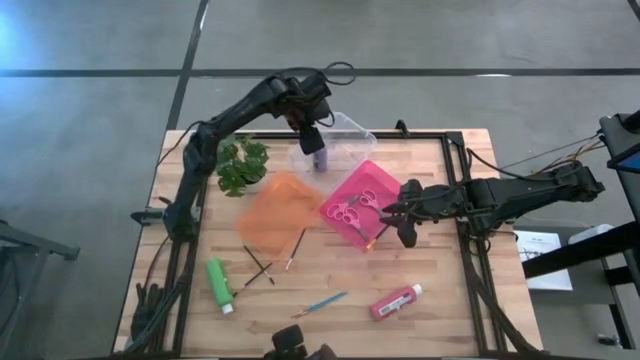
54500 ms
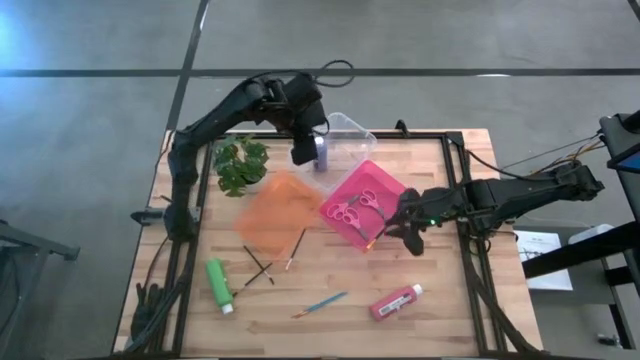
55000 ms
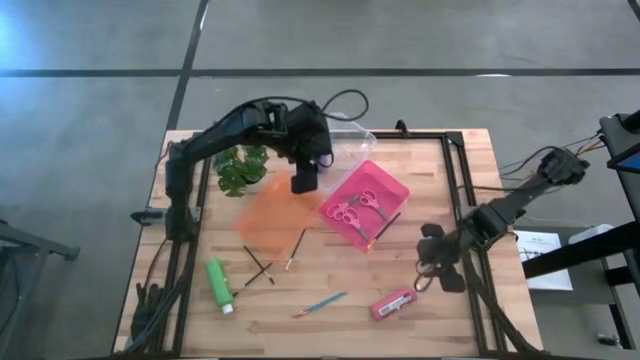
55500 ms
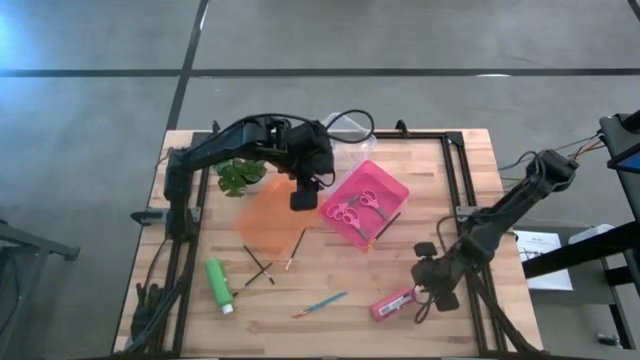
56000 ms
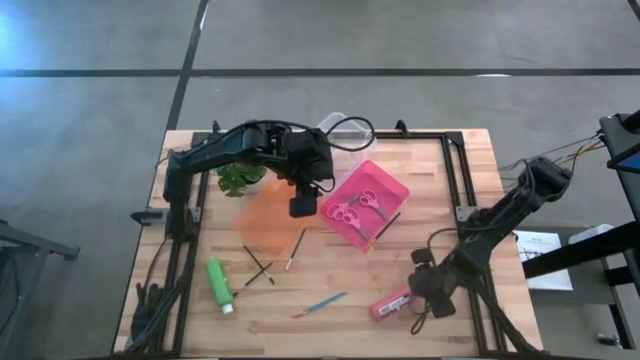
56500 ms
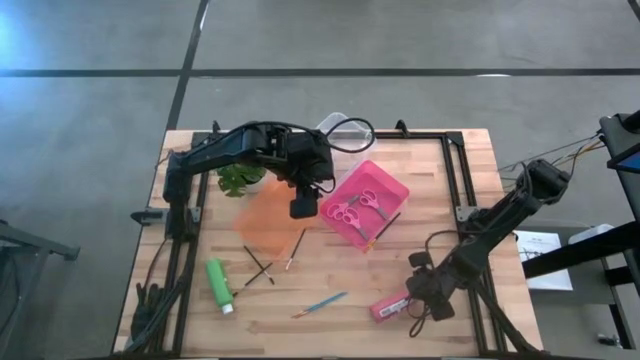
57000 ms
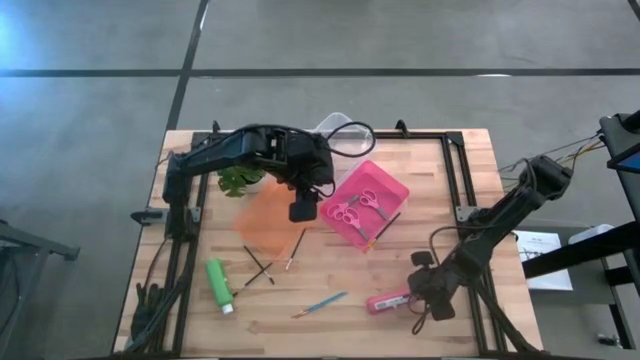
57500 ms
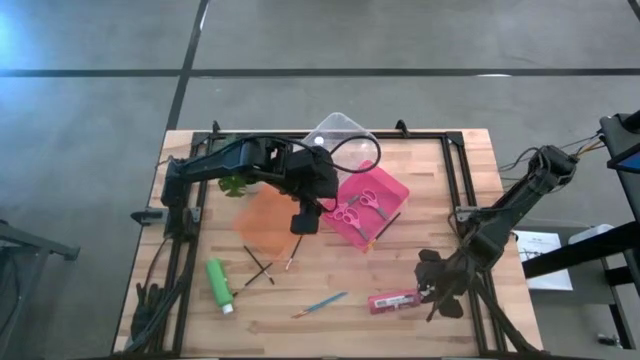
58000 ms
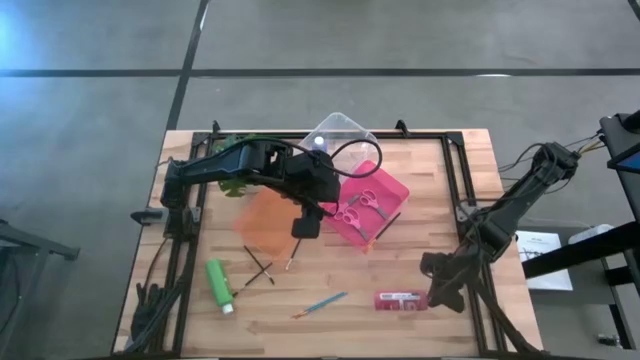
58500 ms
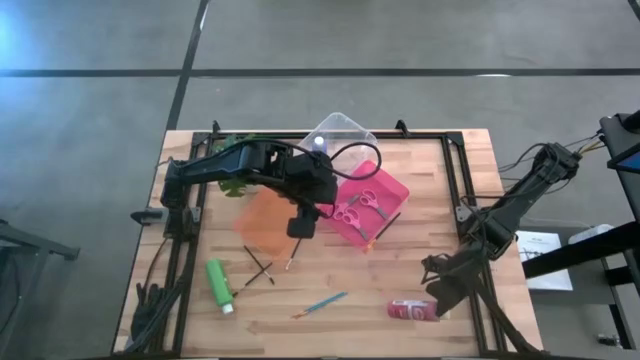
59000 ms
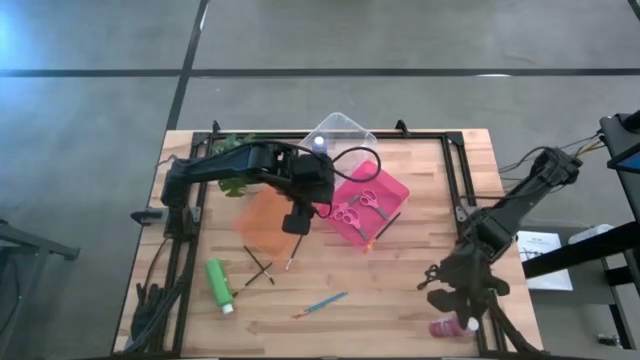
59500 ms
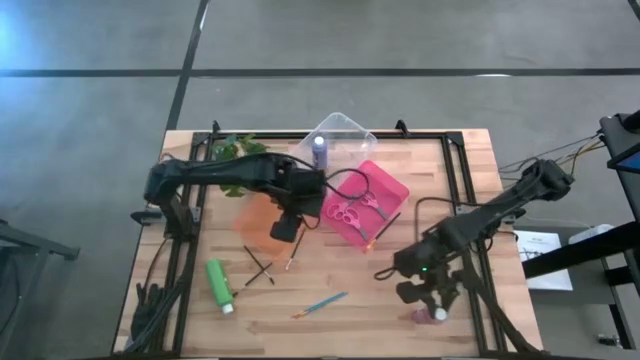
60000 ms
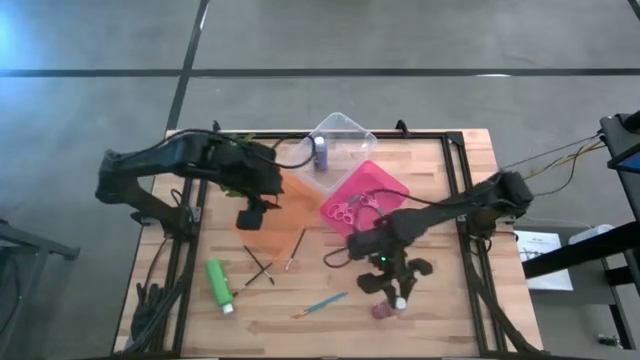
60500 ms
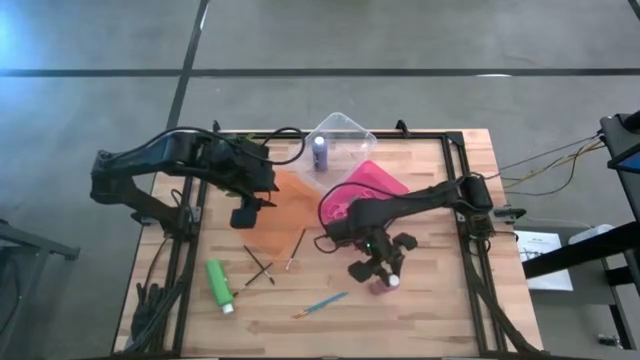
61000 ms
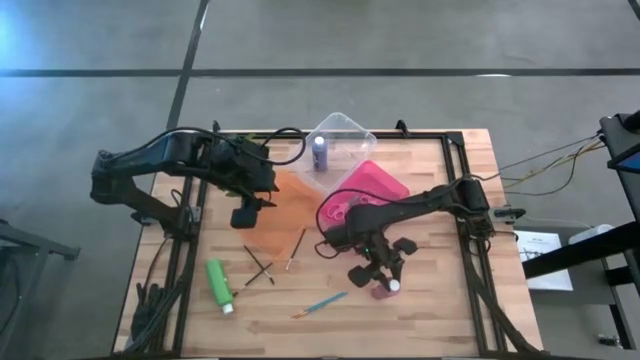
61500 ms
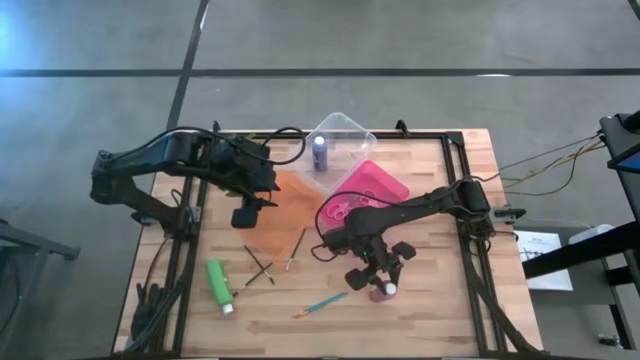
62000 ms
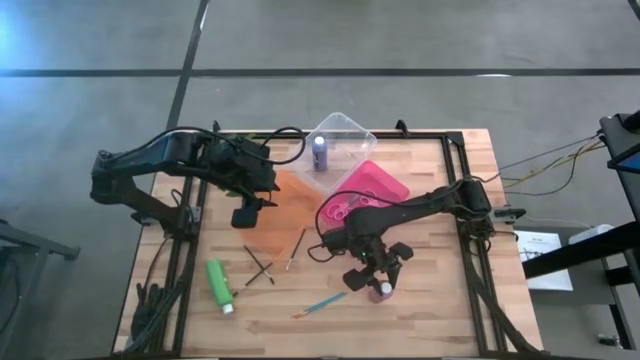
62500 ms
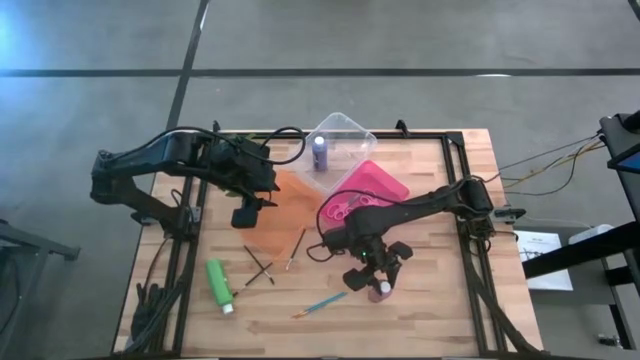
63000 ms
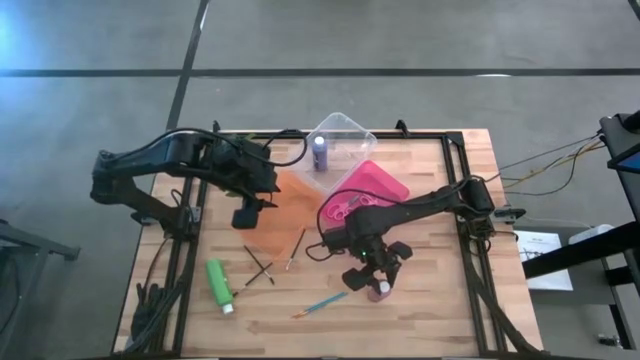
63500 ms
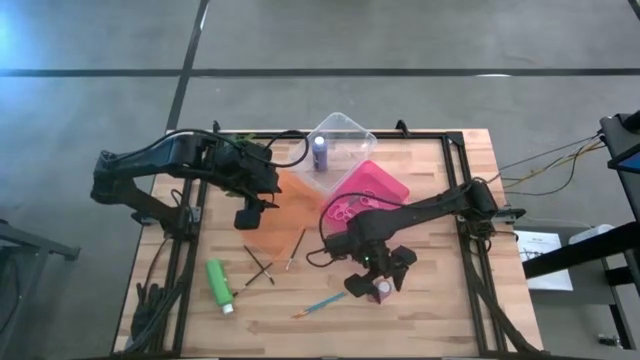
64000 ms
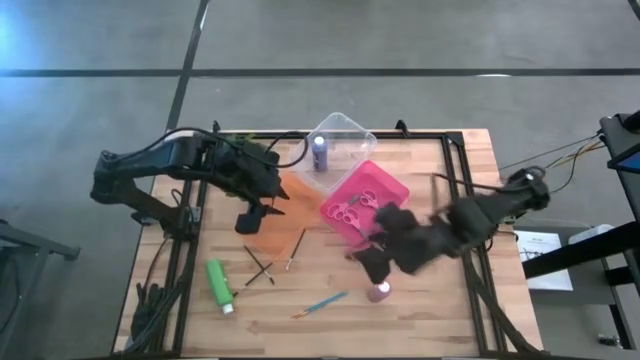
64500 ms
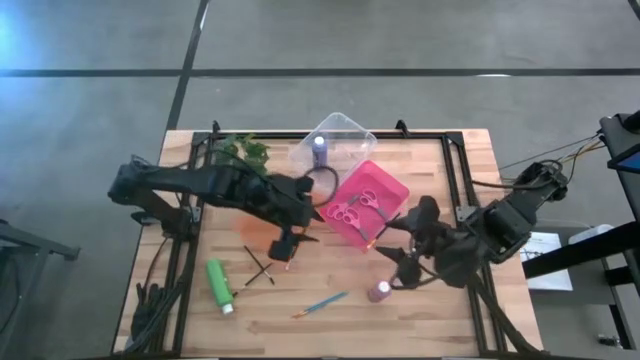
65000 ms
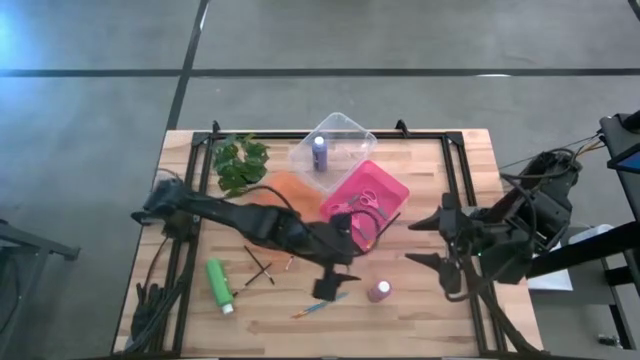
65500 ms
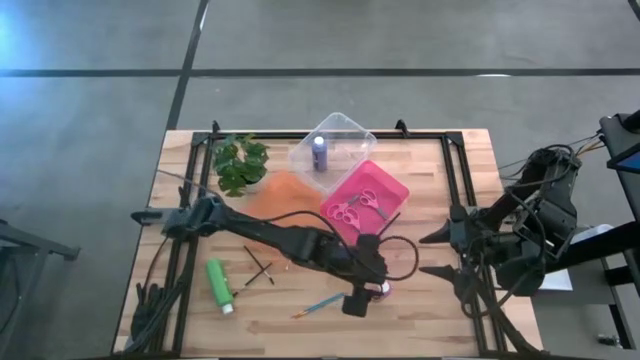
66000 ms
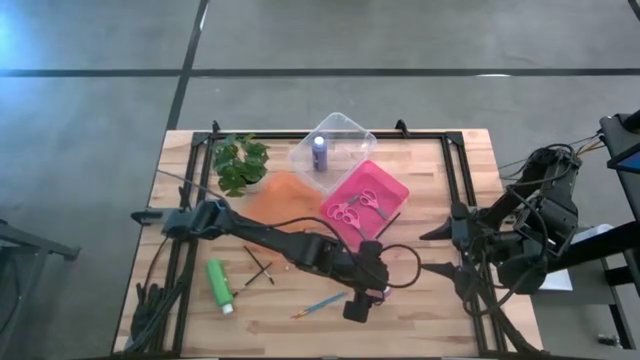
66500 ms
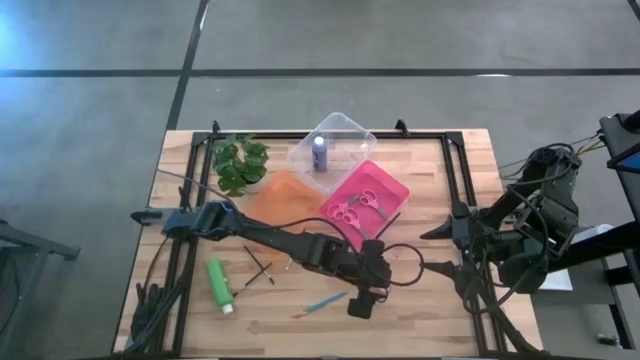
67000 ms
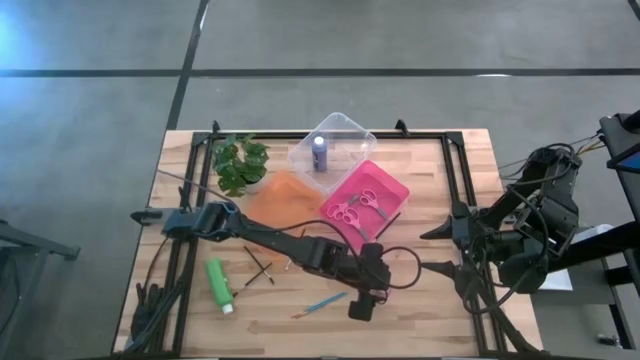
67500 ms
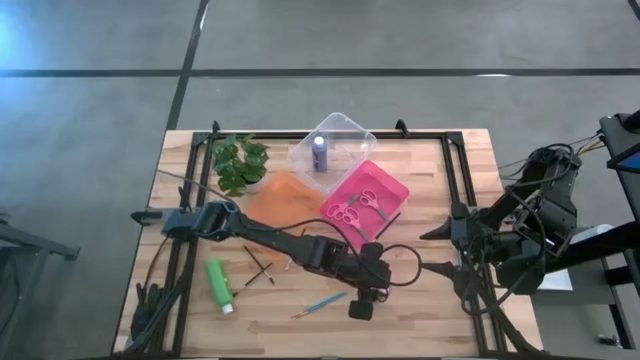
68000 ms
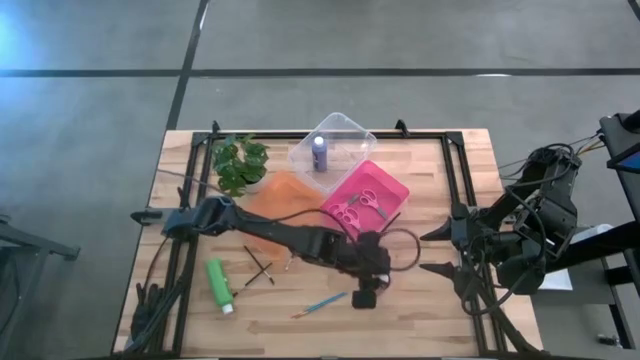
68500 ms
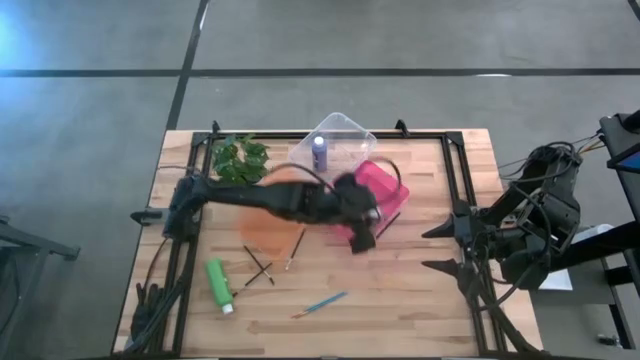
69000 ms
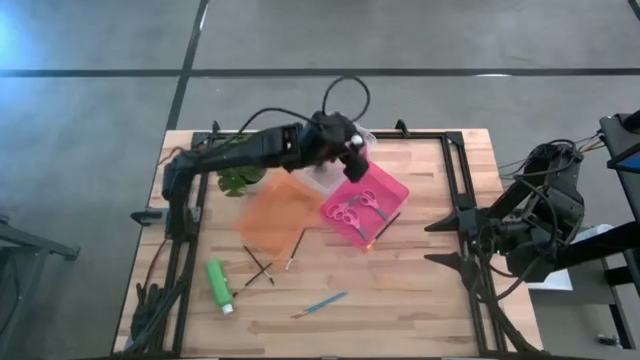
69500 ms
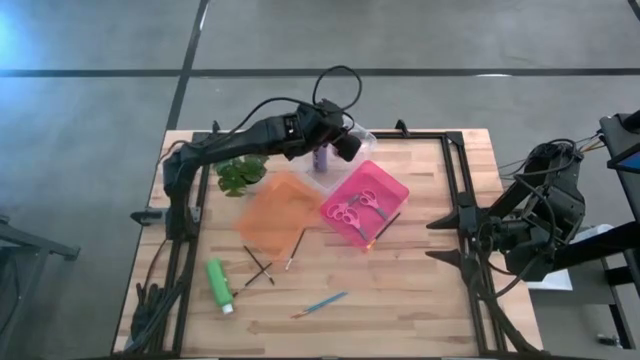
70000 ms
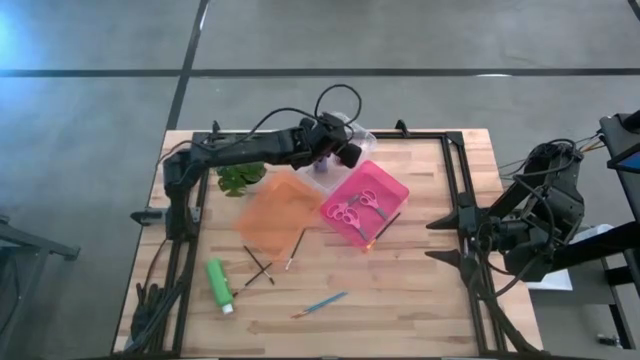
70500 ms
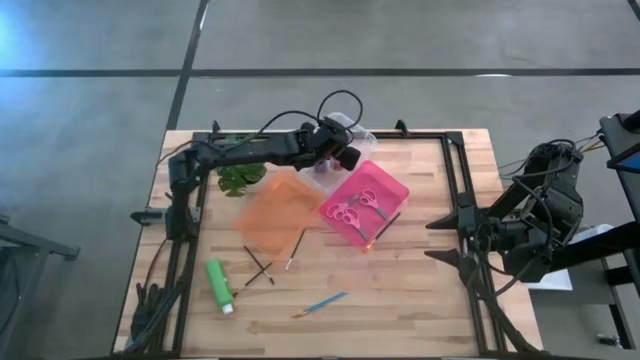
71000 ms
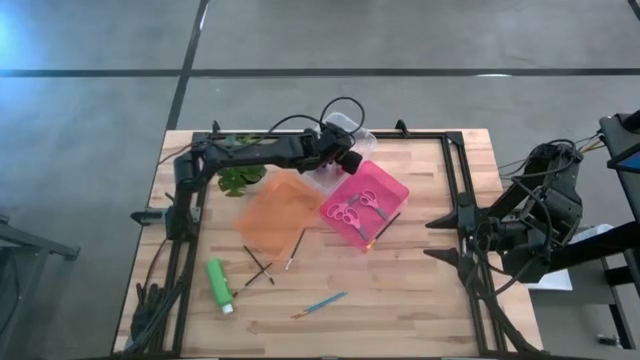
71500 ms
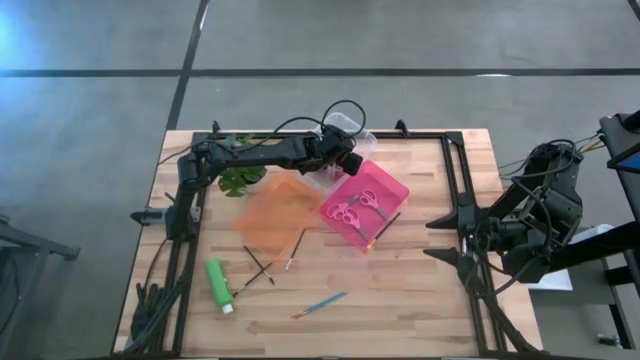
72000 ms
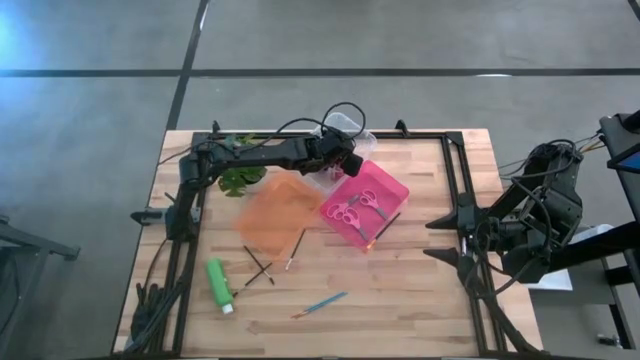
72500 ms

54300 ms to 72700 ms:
Task: Pick & Place Paint Supplies
Put the pink paint bottle into the transparent bin

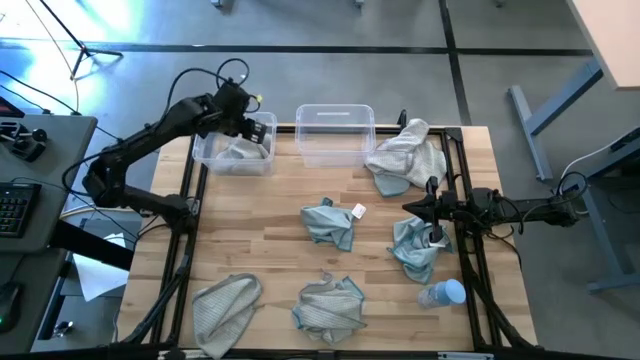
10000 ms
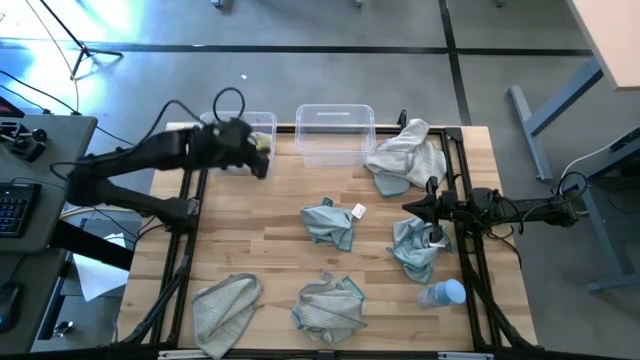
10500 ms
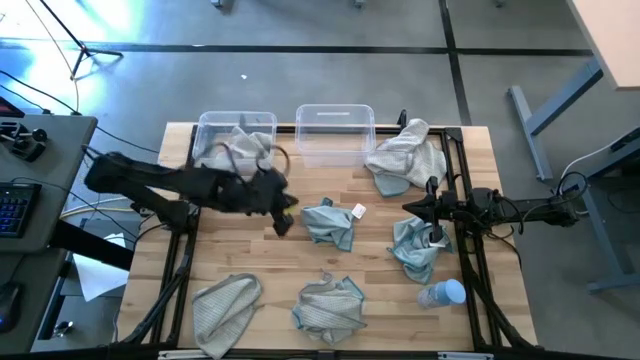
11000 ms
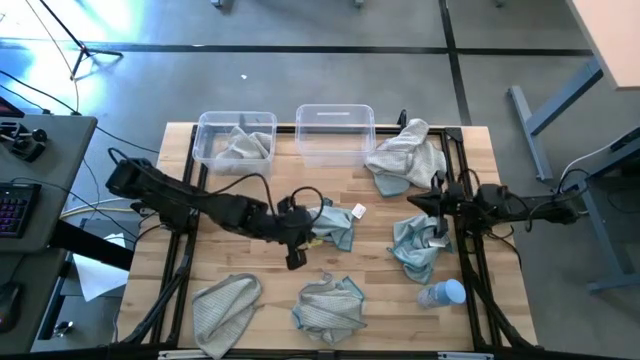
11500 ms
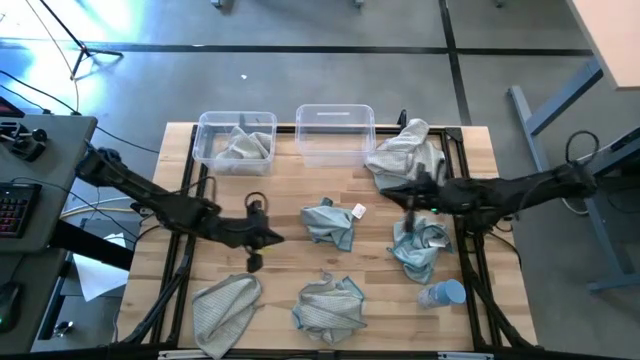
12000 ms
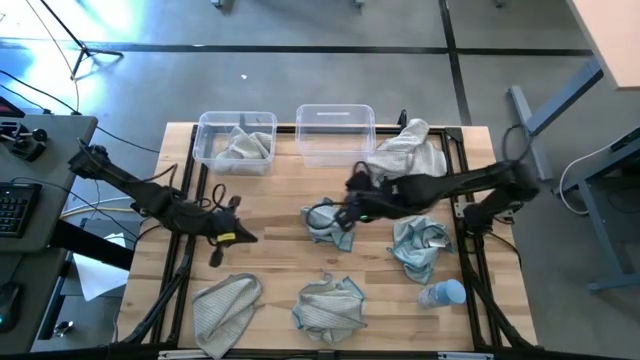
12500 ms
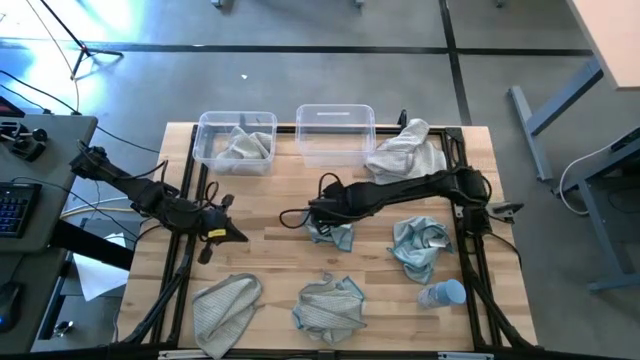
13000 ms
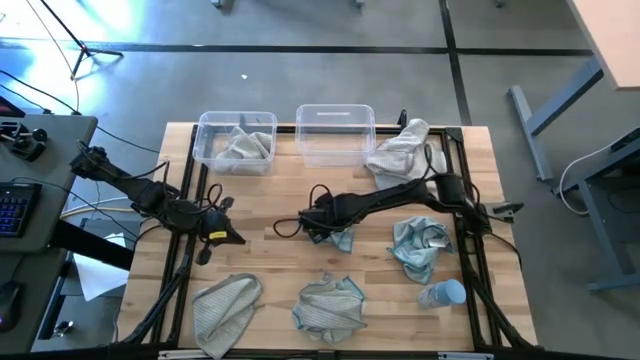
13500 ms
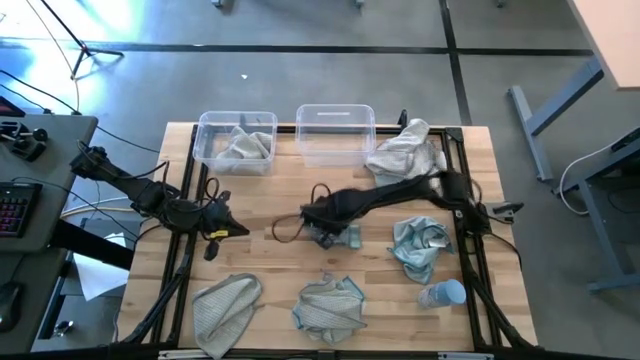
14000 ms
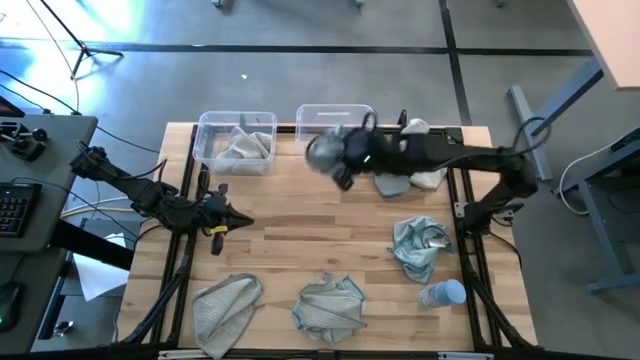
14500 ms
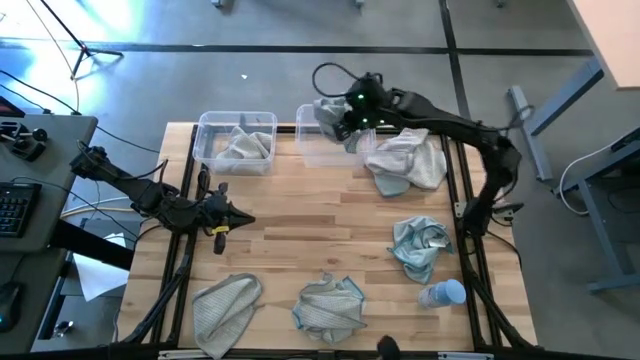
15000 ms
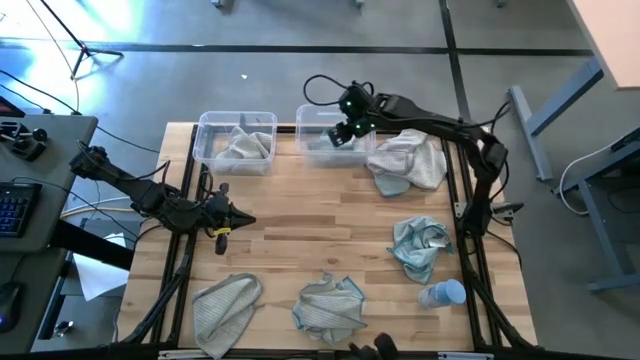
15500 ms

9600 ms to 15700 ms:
Task: Sort microfiber towel by color & place in baskets
Put the top left blue towel into the right transparent bin
